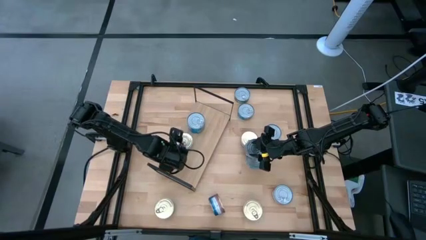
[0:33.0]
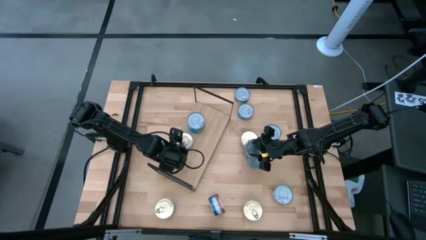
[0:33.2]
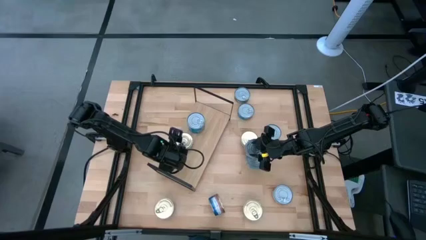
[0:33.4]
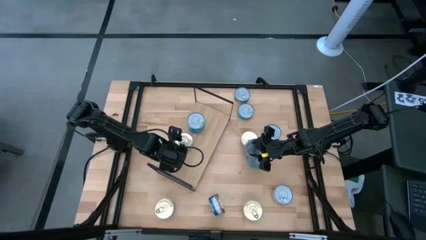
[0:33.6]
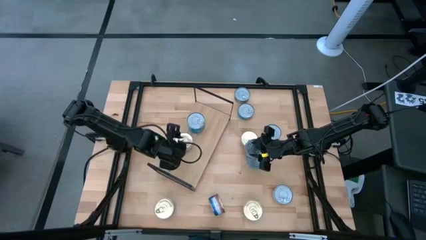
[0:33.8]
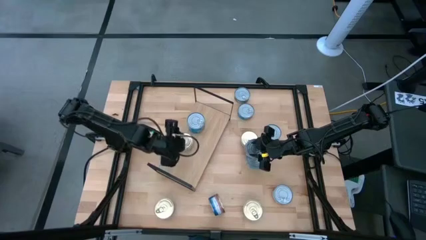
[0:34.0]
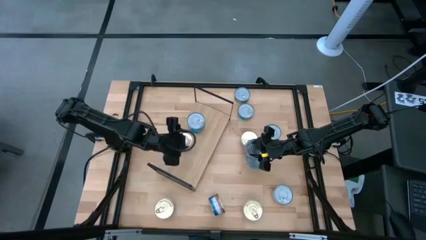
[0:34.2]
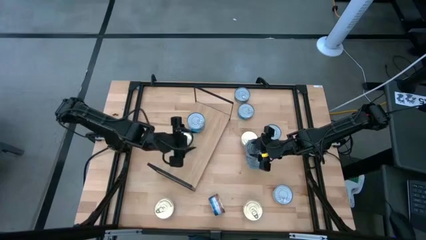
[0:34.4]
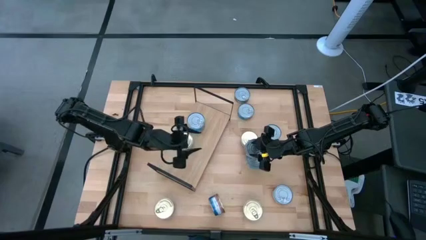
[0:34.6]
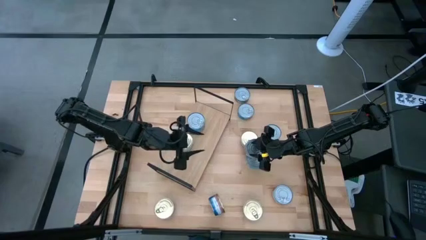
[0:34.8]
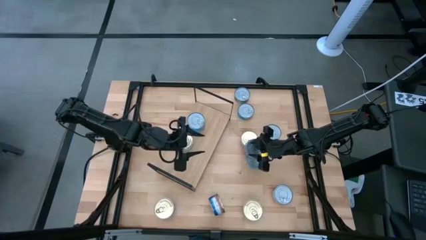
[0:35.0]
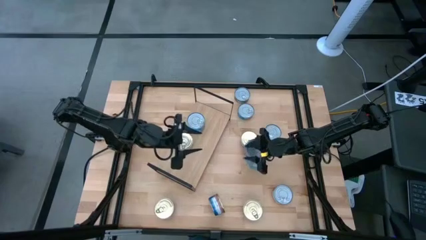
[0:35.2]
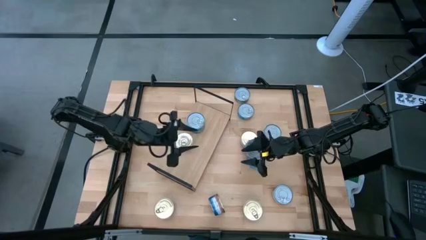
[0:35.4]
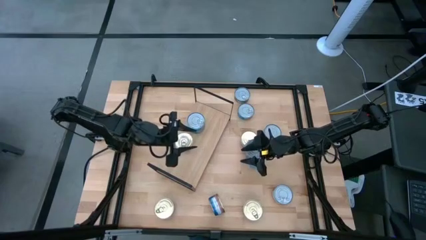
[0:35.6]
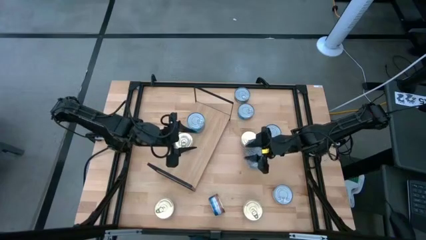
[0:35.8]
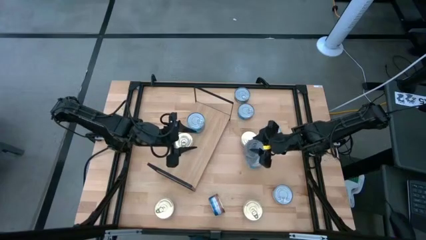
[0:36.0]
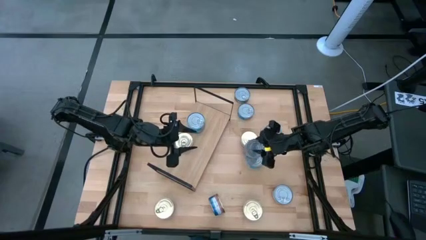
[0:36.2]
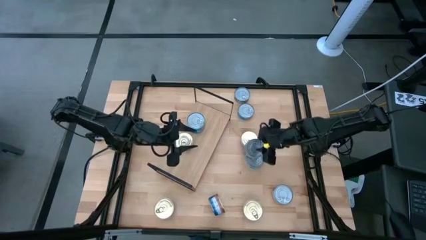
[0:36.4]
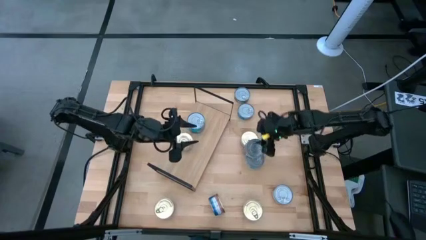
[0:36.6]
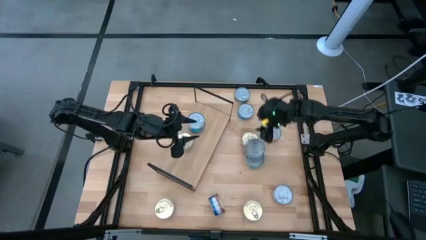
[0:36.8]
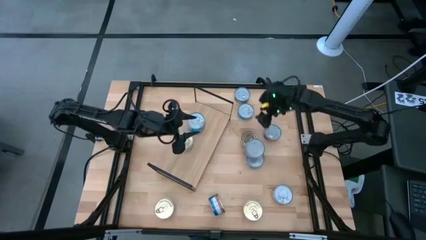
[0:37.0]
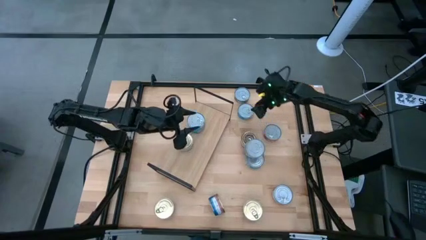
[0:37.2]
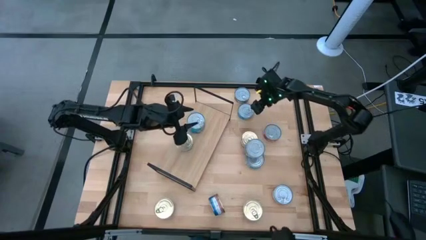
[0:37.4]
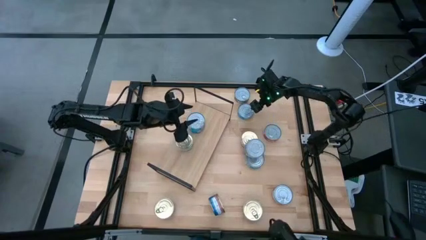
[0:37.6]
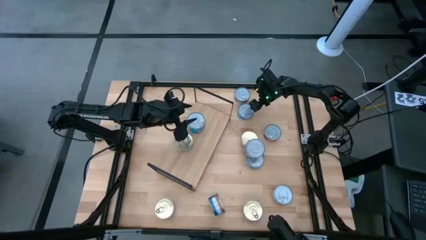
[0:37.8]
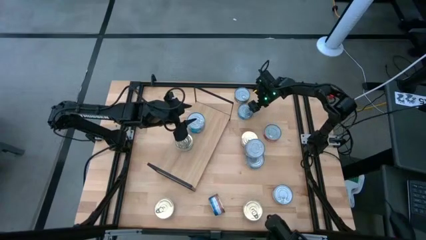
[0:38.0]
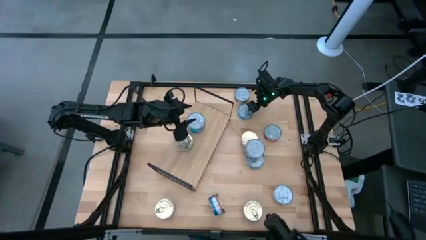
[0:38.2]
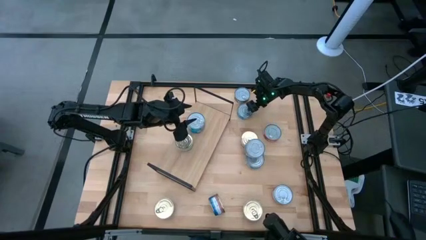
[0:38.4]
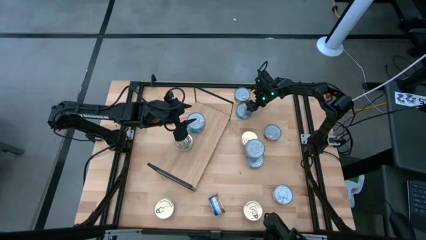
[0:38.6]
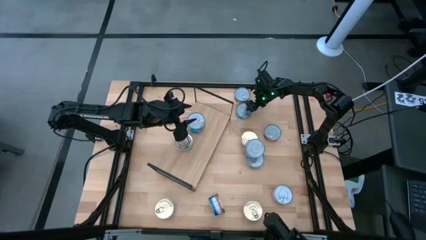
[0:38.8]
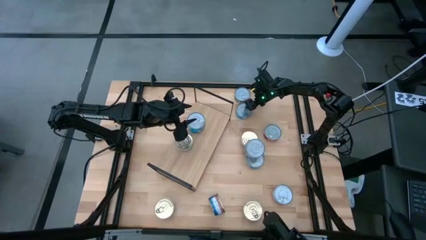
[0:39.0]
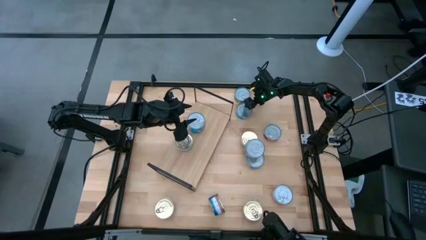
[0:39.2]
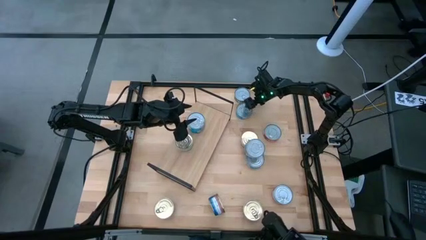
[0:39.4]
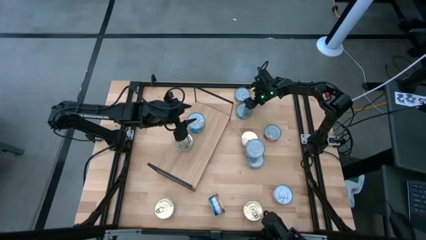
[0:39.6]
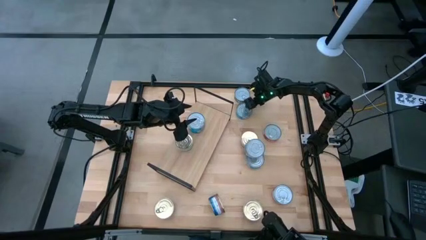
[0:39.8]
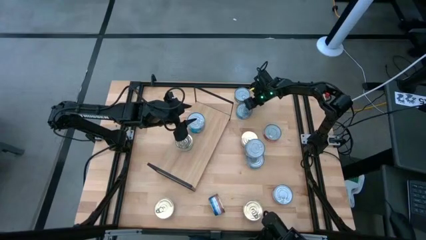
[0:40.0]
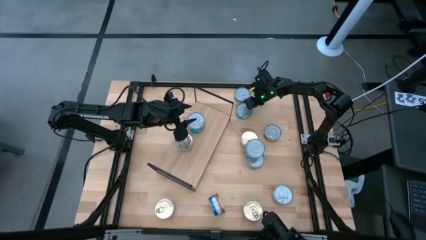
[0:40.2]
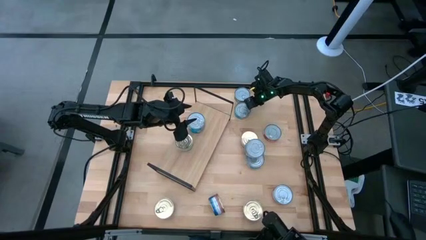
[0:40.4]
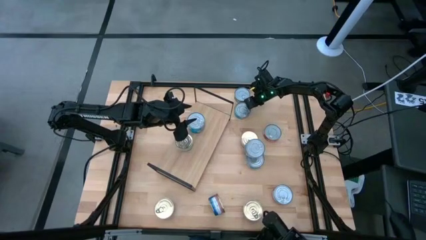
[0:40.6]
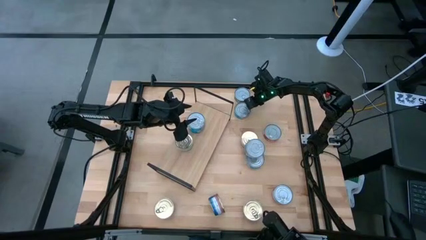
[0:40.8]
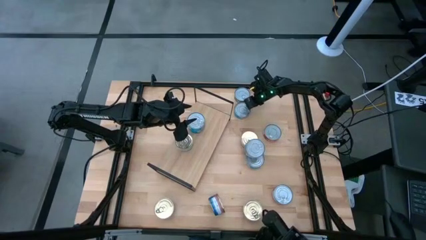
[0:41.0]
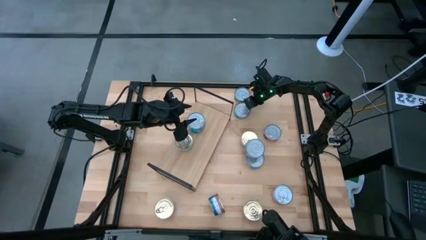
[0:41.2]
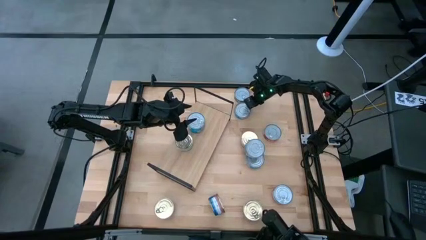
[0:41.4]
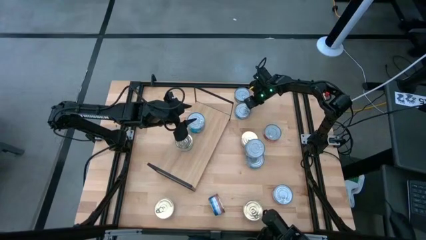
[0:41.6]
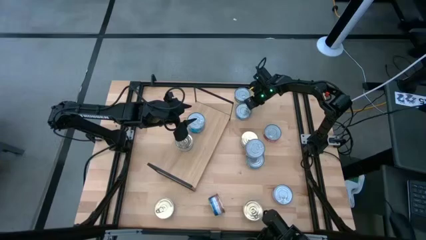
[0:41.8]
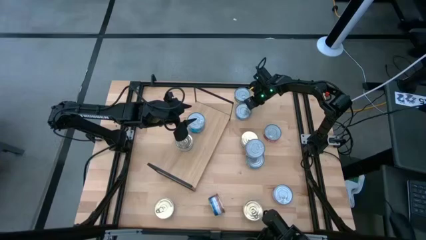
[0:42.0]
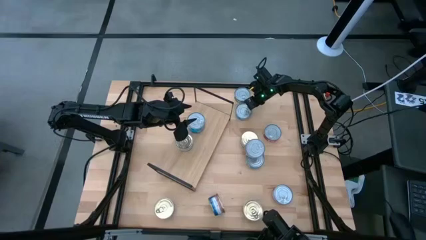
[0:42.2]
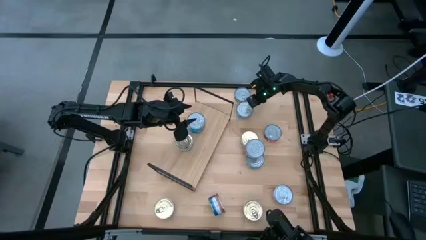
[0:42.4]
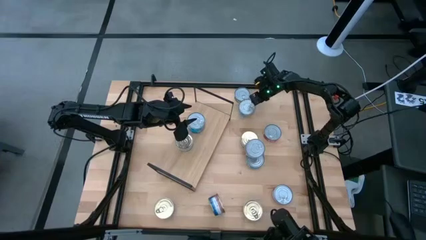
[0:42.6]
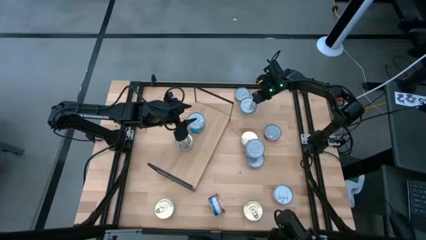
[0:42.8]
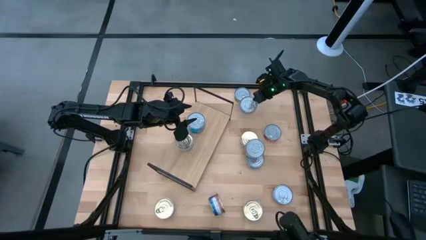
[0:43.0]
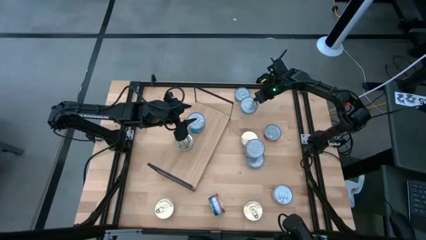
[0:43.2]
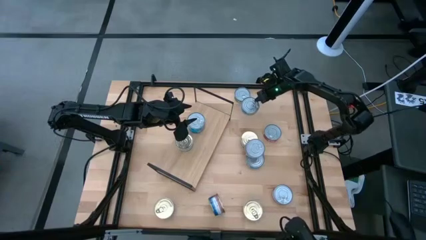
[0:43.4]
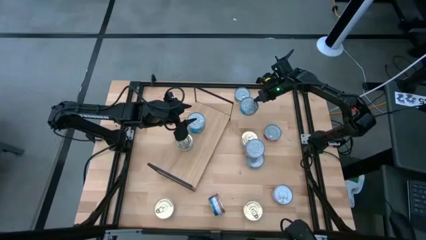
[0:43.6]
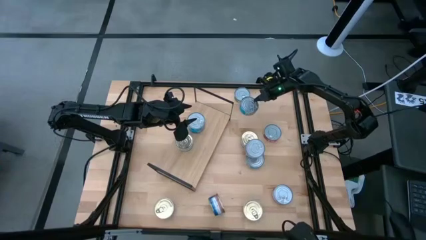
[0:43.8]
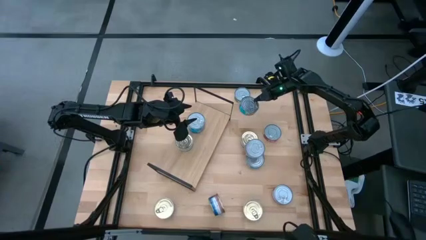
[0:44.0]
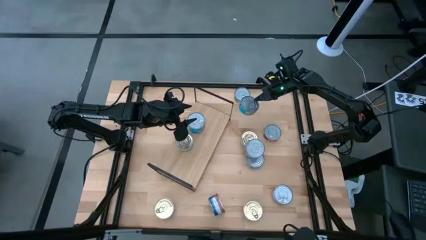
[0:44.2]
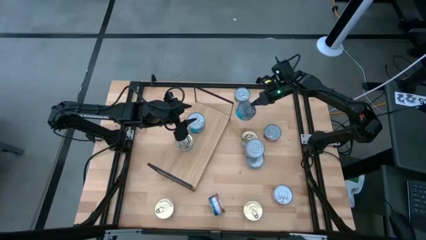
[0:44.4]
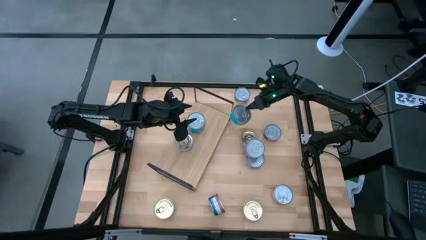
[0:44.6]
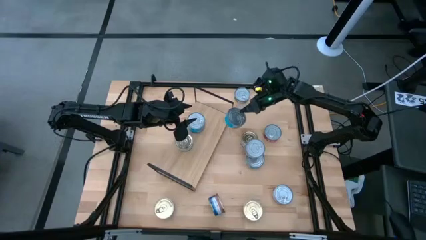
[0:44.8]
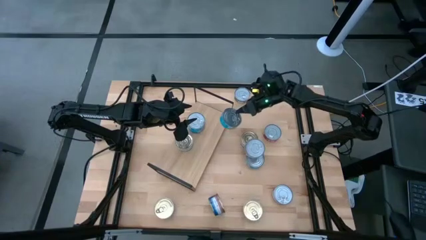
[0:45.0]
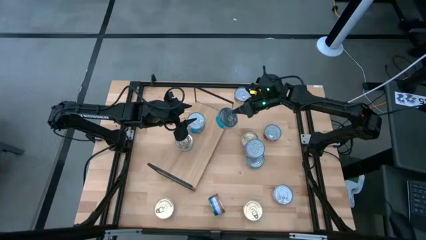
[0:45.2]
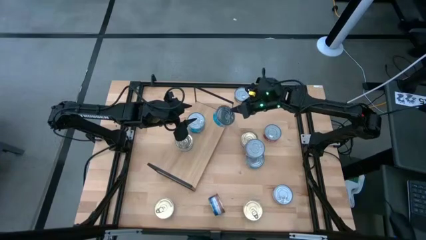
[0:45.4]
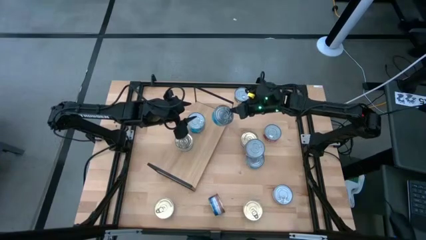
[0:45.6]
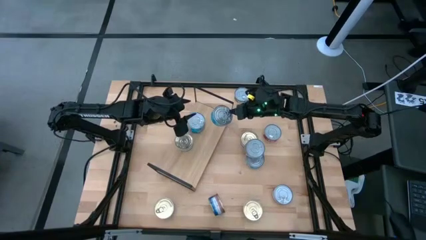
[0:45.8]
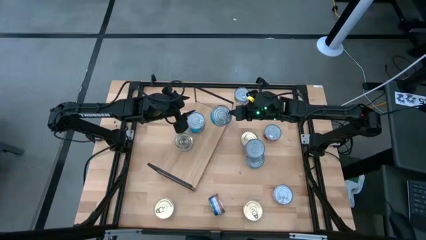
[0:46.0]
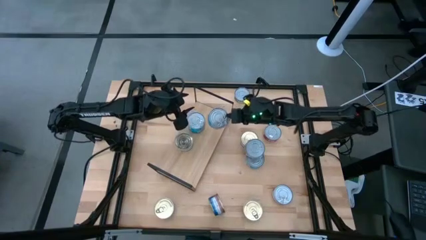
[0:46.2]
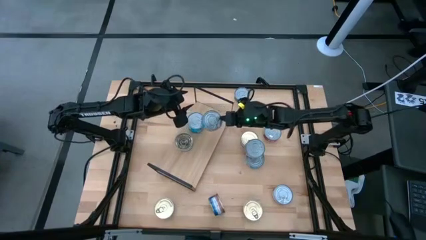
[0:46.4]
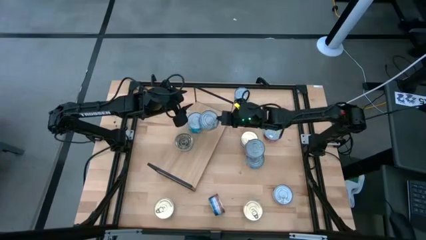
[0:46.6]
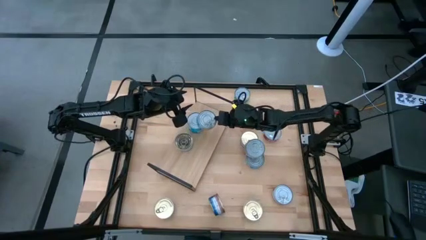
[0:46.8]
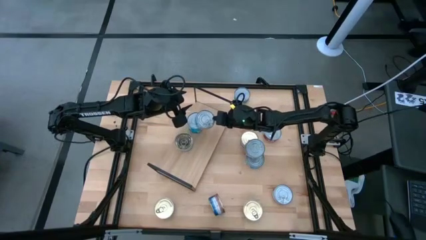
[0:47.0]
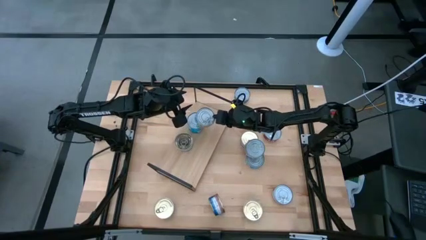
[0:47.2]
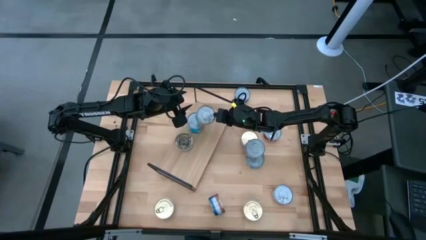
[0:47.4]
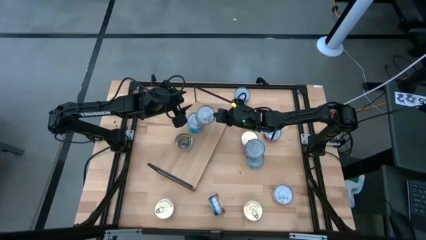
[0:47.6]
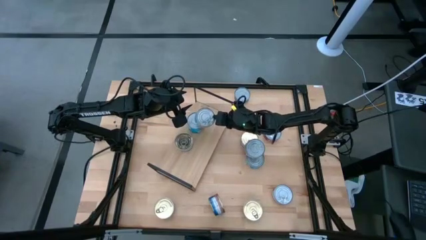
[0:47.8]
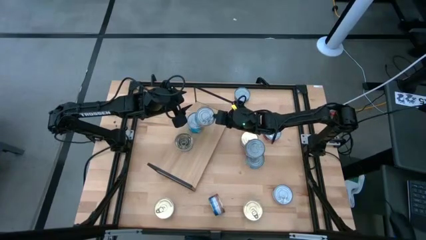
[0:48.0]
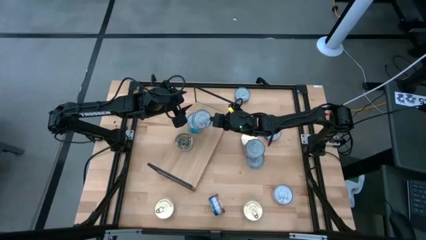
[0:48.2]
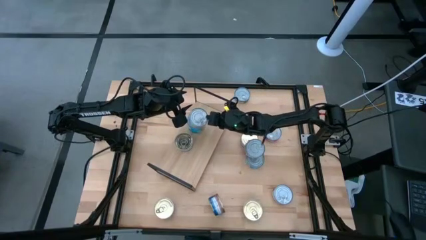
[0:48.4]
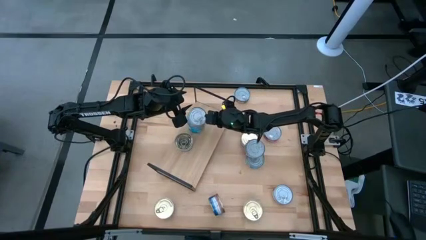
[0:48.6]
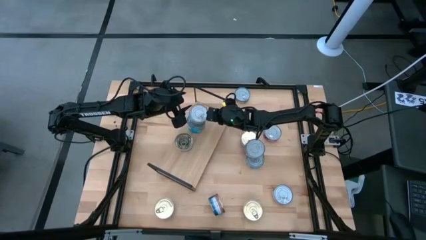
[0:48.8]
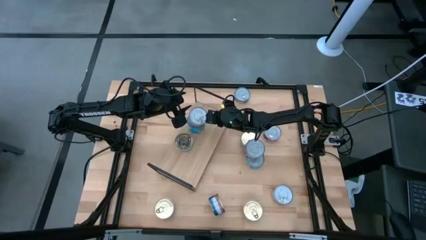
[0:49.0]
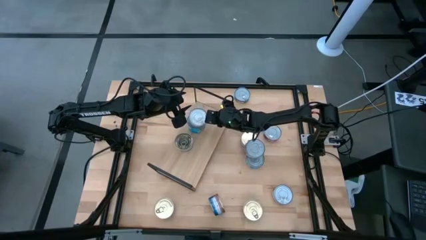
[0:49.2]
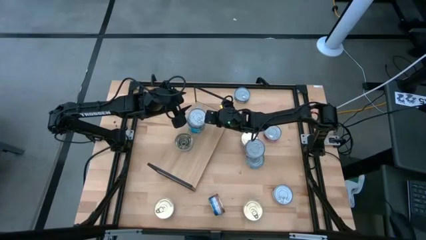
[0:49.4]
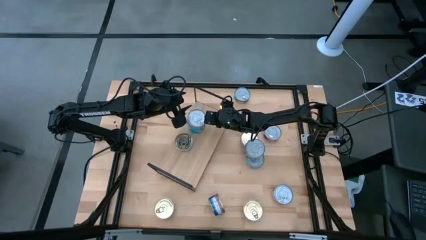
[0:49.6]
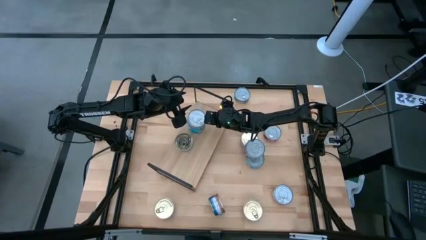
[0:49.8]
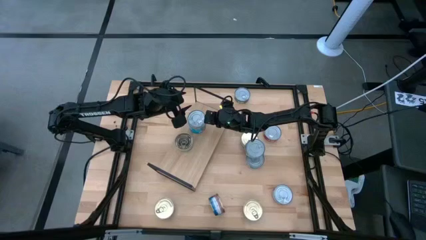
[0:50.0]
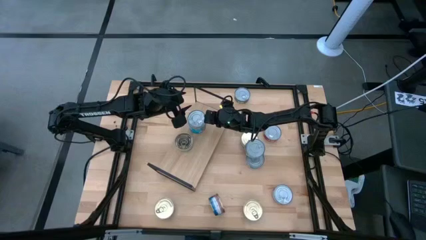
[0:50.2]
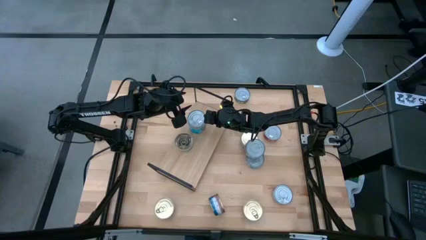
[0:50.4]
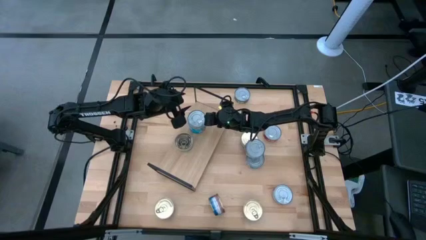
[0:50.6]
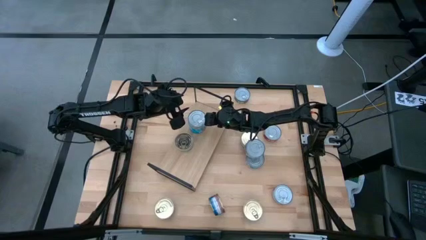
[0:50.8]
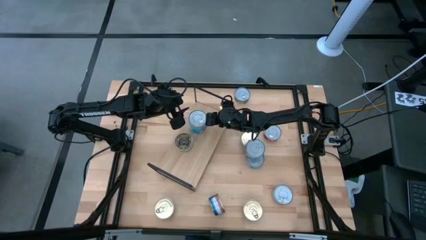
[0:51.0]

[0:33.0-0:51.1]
Task: Stack canned seafood by type on shelf
Stack the light blue tuna can on top of the light blue tuna can on the shelf
